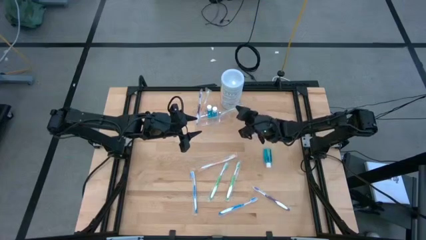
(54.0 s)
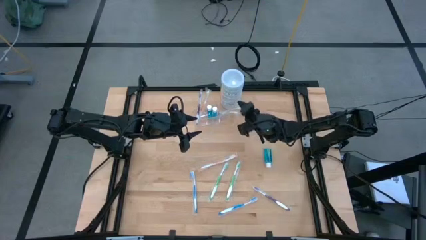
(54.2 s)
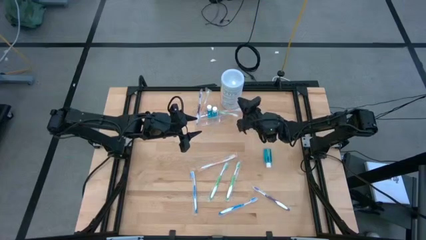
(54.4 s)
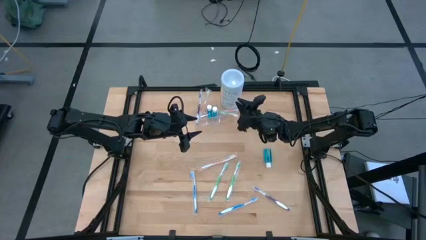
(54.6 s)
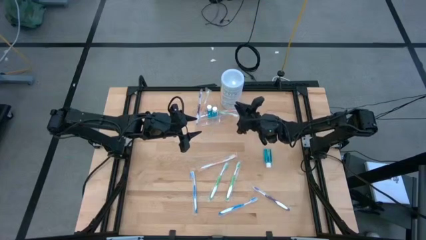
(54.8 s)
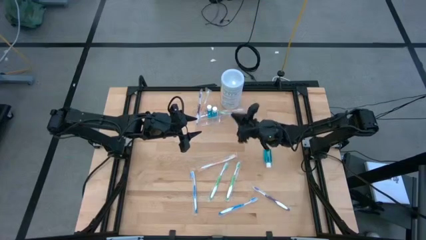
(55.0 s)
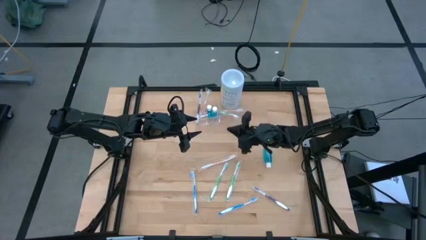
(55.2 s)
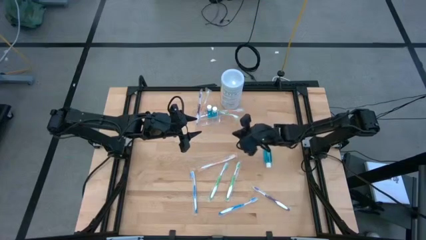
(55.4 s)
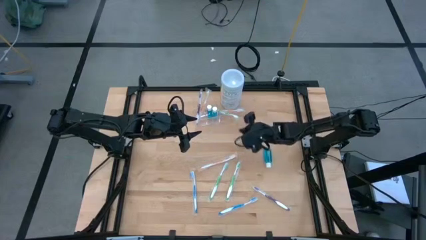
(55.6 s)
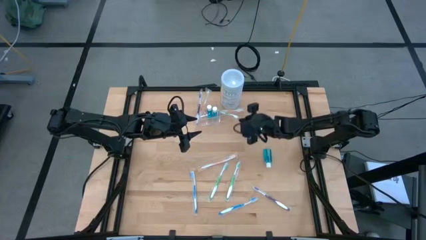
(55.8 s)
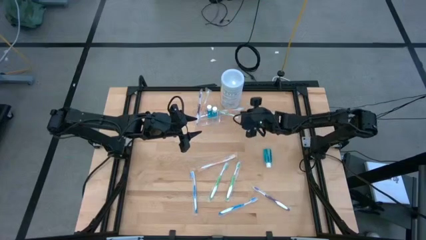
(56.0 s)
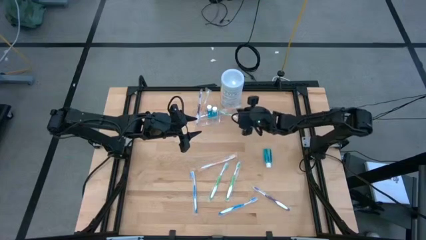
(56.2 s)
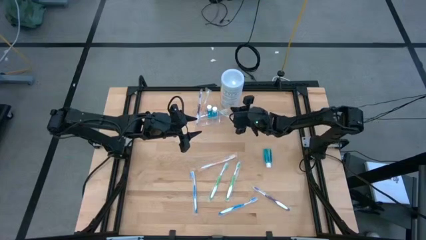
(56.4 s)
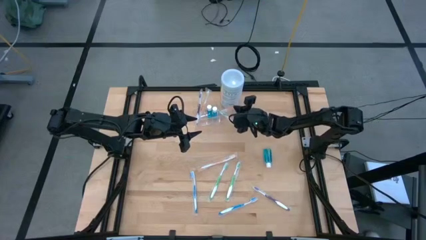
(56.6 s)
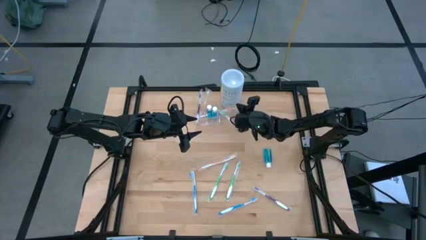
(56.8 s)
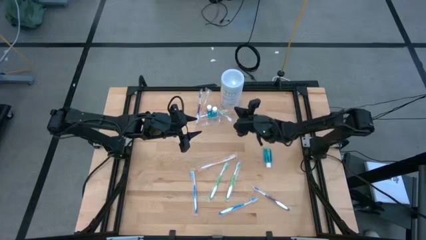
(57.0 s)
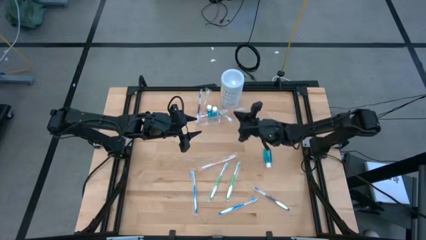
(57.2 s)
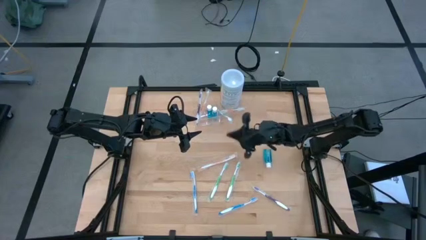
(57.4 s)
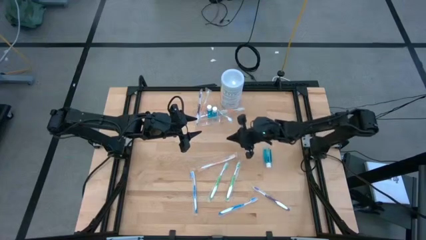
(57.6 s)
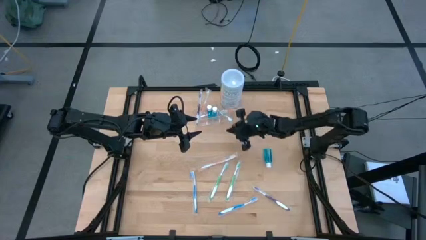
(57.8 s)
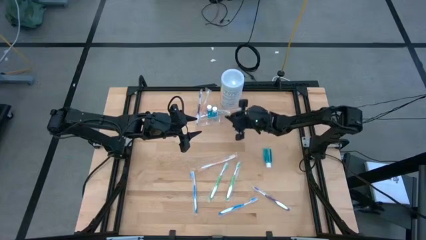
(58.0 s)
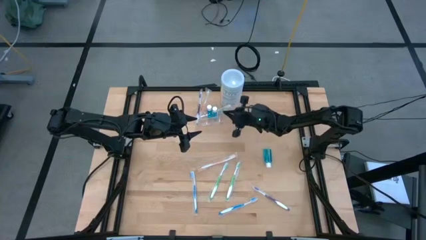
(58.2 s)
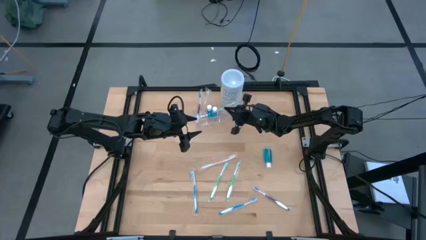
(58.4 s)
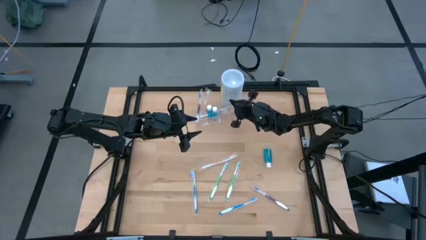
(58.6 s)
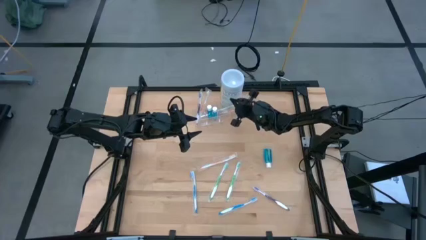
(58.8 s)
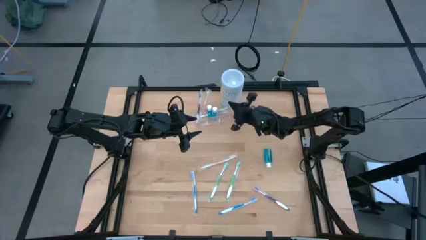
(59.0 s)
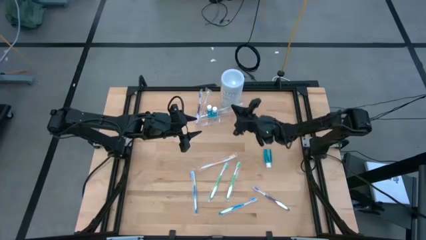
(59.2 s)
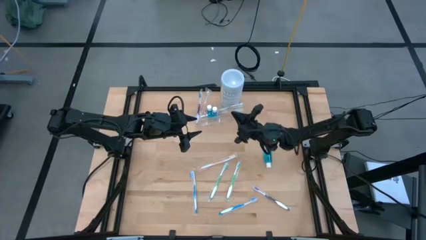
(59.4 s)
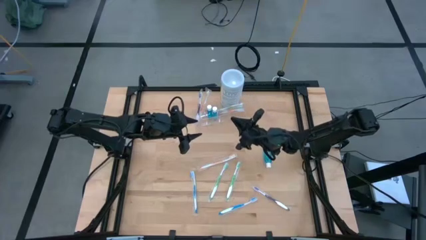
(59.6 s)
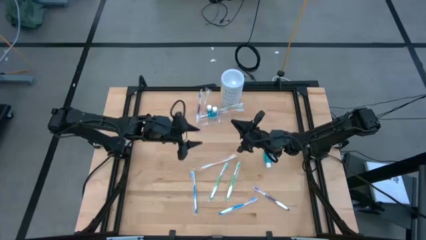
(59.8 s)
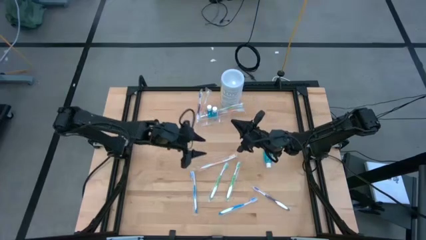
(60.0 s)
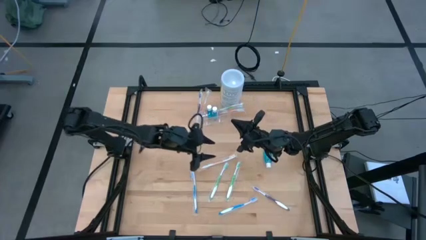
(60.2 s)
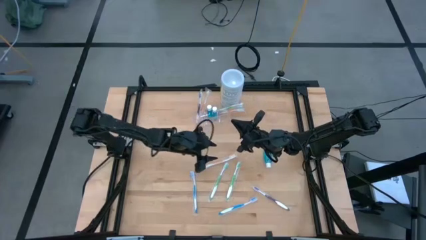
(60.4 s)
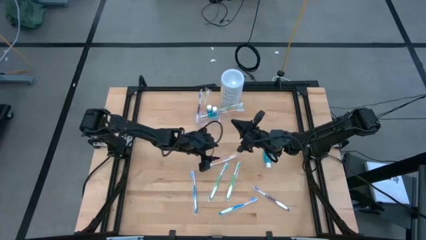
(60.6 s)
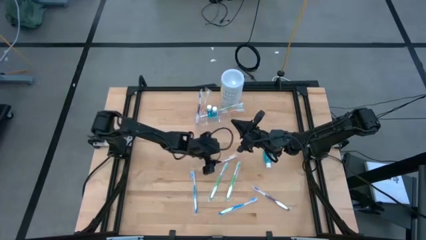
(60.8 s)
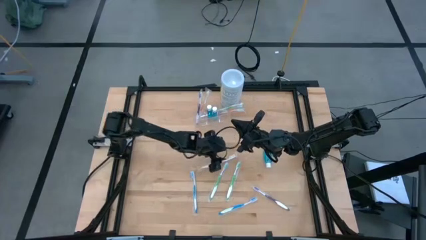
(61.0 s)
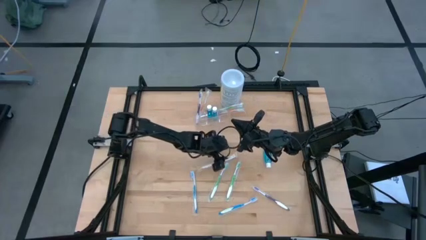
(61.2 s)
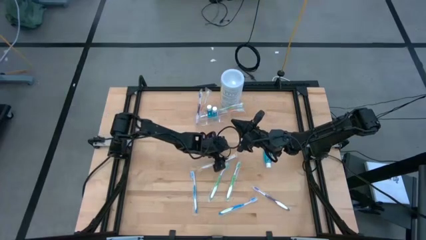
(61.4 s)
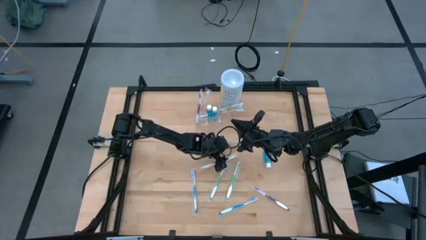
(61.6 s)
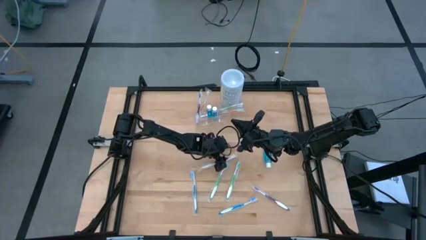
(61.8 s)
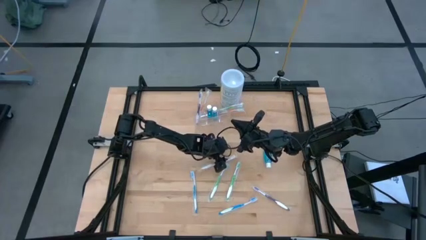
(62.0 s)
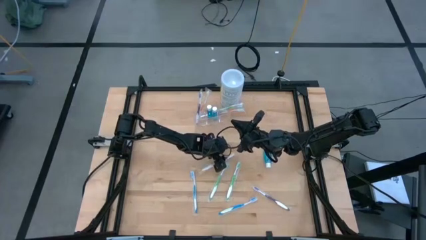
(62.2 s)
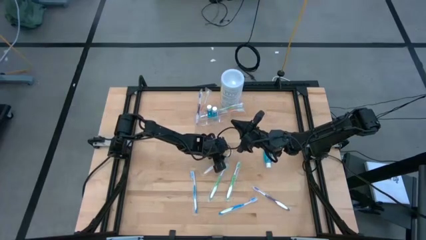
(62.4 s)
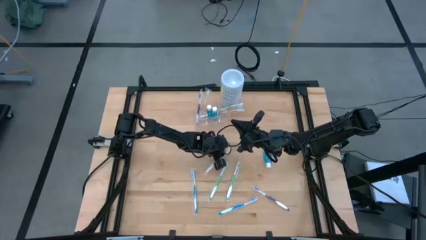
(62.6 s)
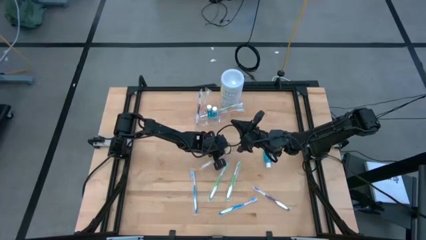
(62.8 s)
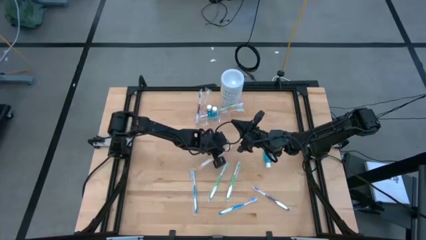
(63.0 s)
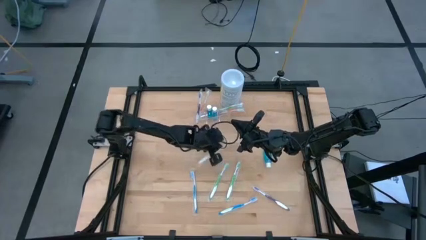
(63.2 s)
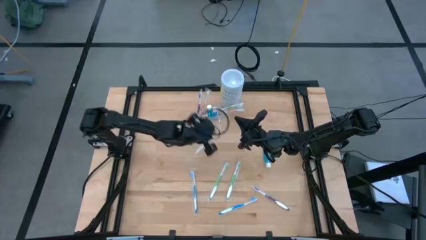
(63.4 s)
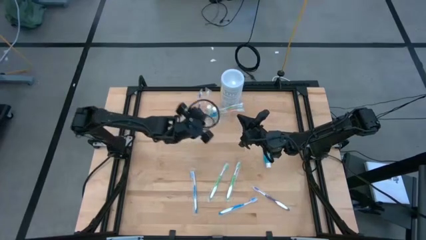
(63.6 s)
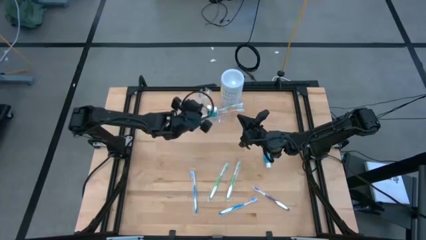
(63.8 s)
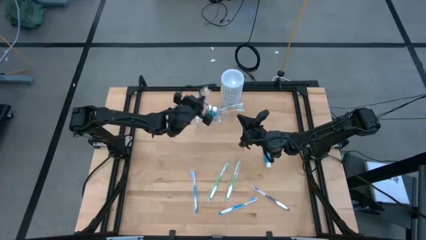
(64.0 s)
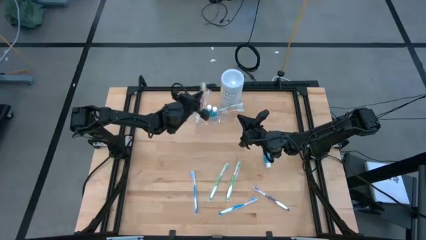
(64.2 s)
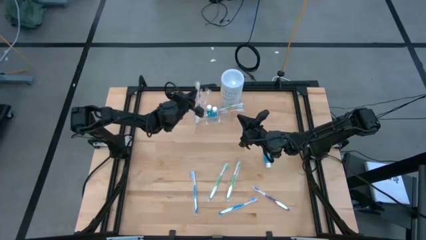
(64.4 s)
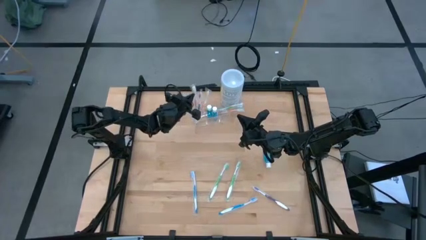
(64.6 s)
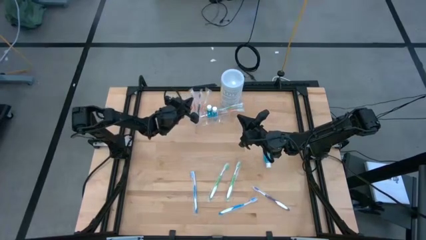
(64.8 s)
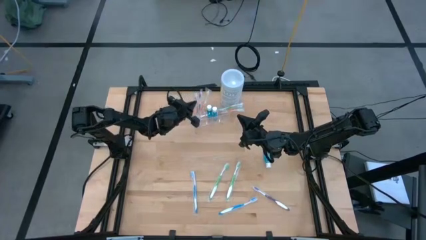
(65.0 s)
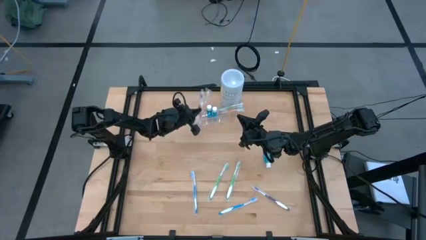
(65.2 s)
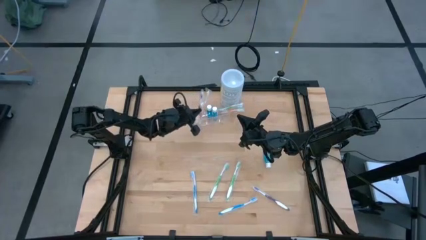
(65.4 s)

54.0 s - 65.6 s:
Task: Pick & Place toothbrushing station
Put the orange toothbrush into the transparent organizer

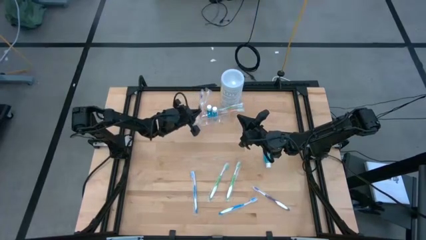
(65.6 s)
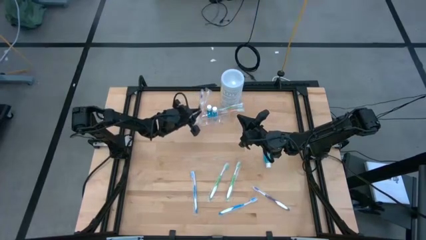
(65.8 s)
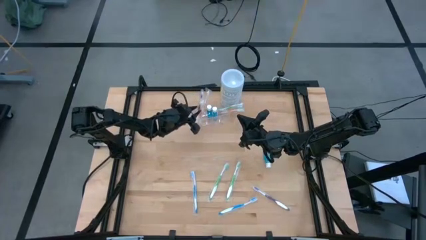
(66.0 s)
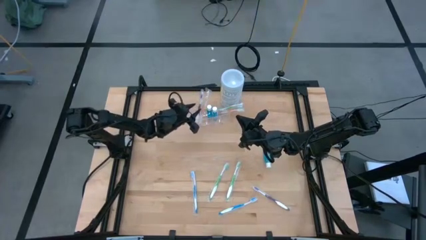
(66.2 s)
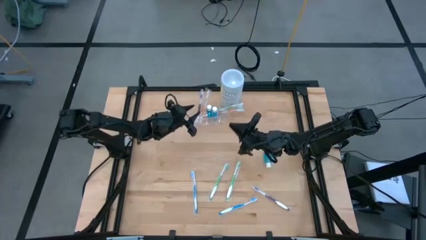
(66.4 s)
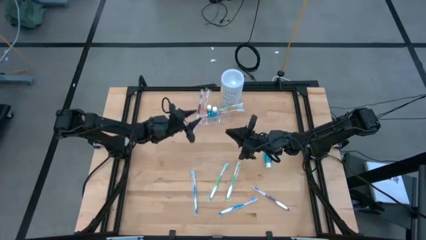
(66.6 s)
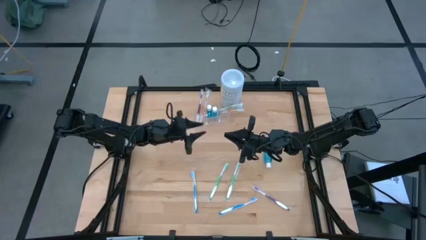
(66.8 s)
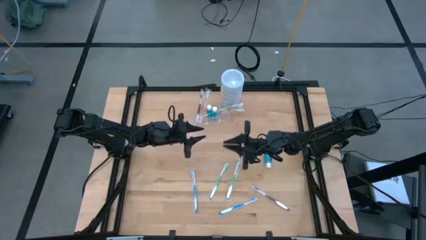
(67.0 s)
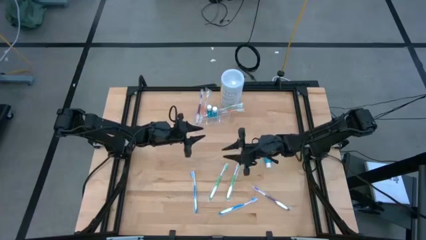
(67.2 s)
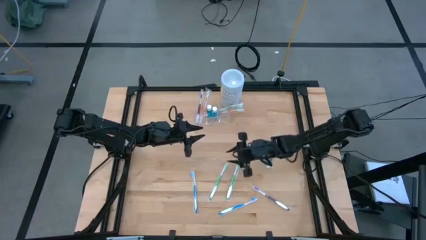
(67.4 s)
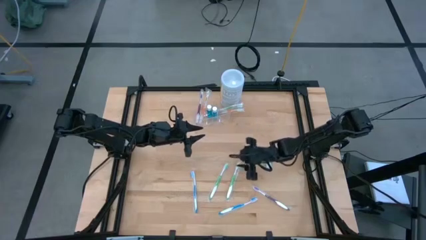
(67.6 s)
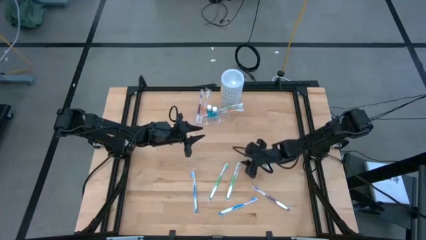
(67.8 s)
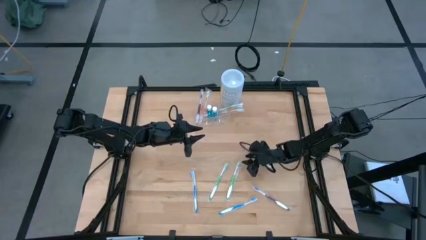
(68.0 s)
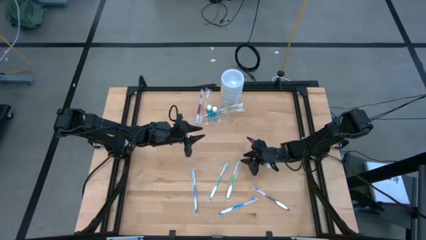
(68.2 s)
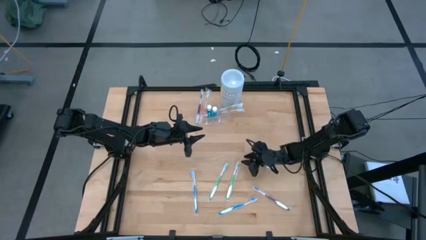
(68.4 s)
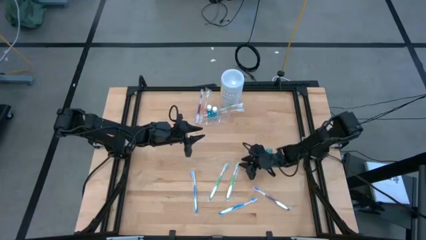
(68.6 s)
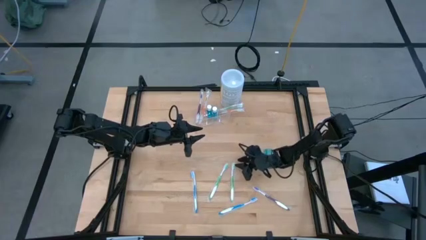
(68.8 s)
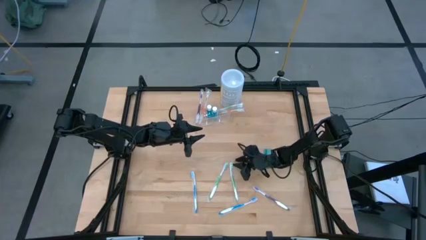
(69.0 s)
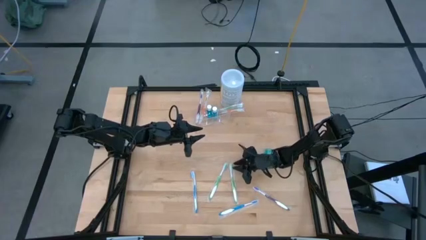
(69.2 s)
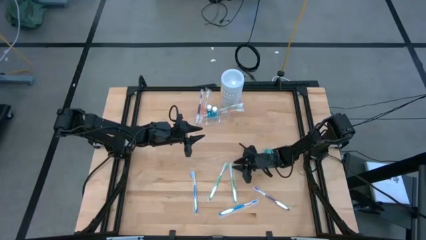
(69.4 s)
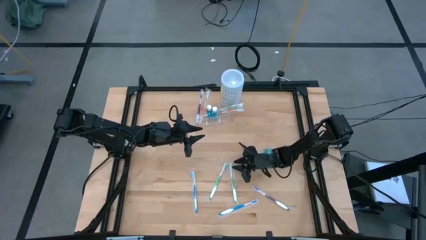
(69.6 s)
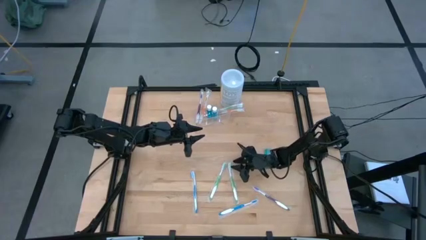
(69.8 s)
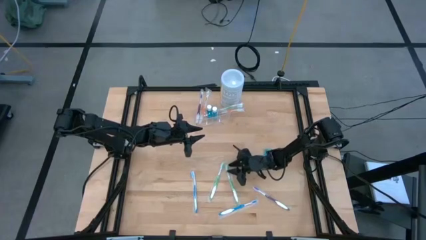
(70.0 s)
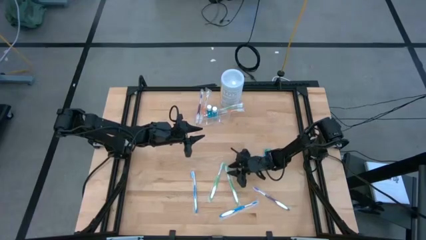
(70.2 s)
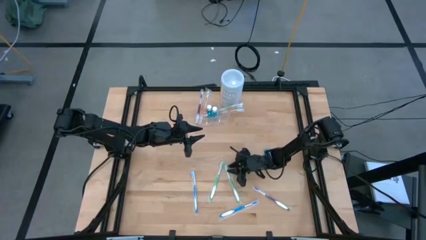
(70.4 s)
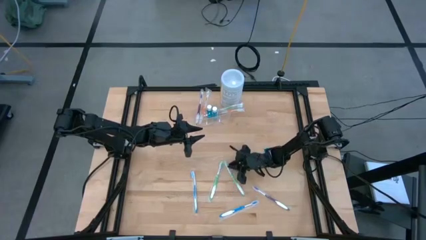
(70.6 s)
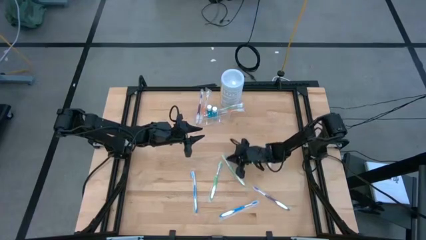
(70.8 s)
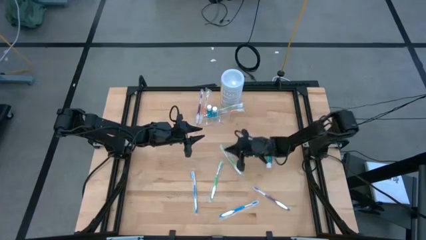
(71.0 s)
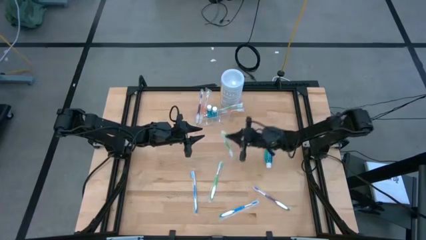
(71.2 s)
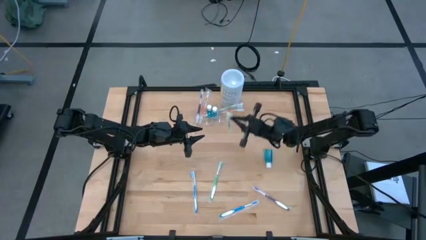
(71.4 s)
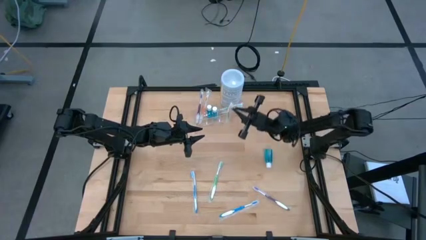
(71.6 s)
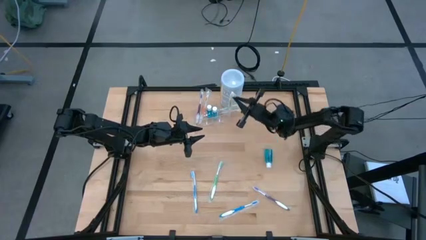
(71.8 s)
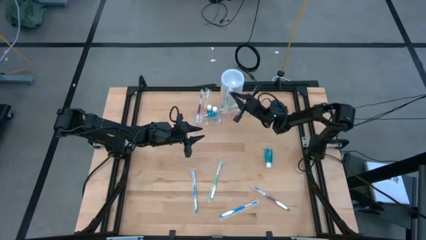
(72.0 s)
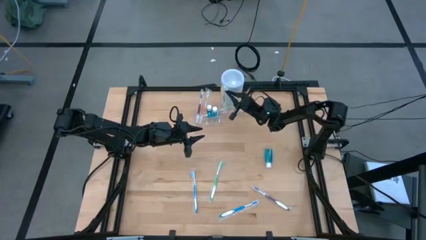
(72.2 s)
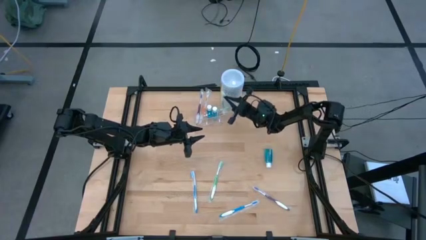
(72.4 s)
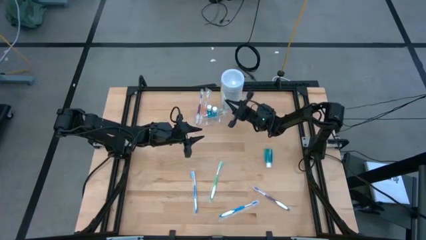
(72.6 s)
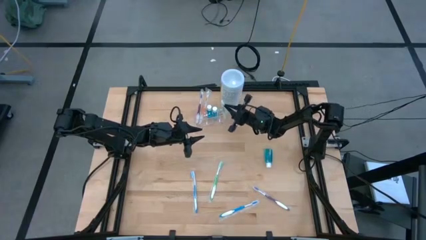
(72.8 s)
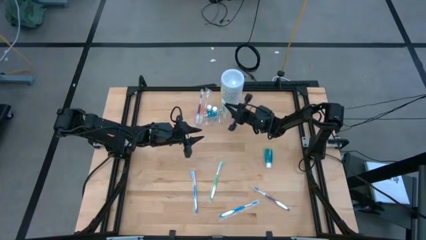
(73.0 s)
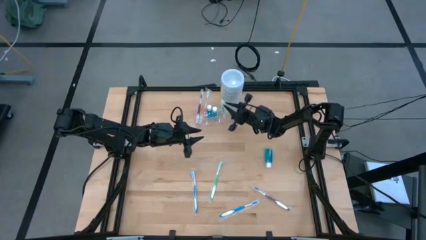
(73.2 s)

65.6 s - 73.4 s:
Put the right green toothbrush into the transparent organizer
